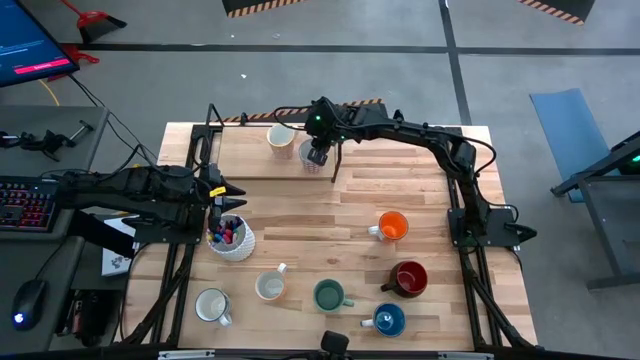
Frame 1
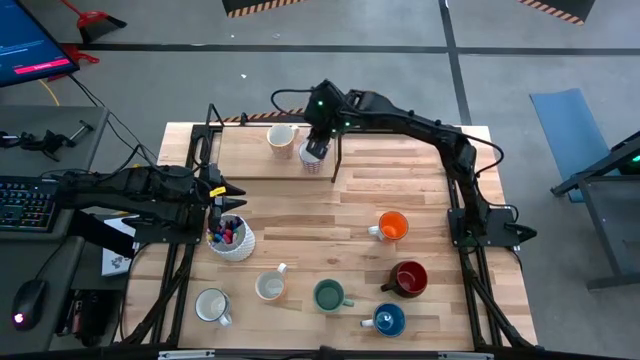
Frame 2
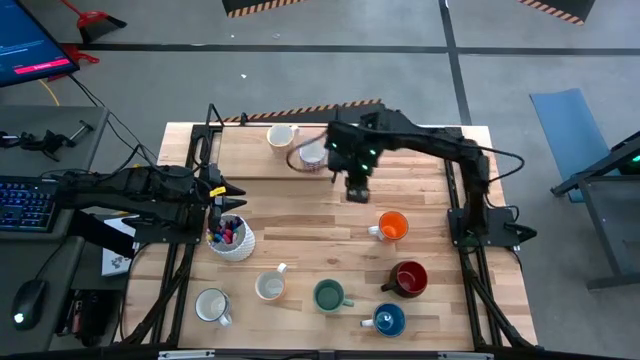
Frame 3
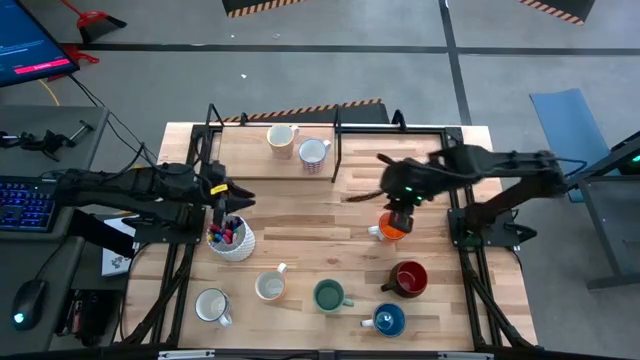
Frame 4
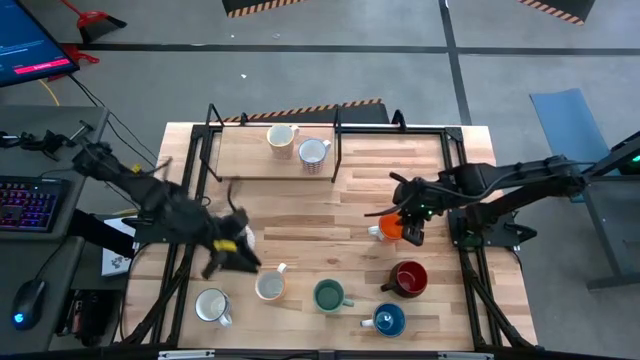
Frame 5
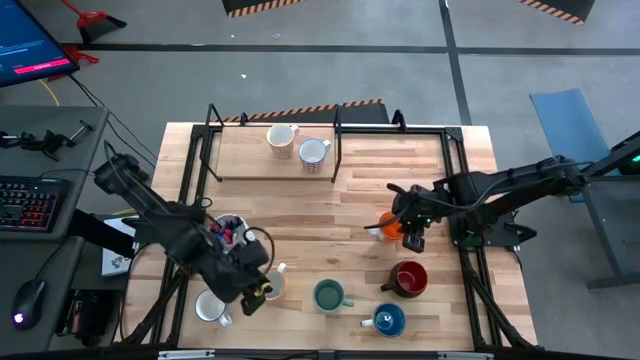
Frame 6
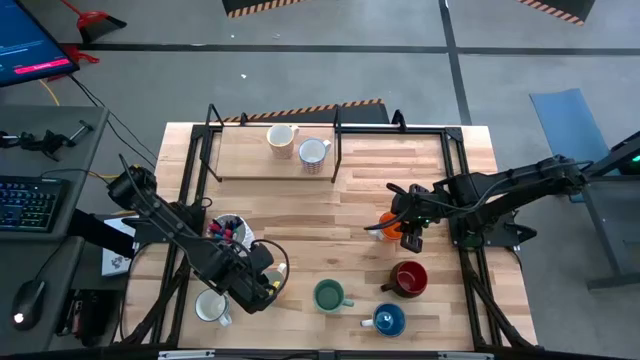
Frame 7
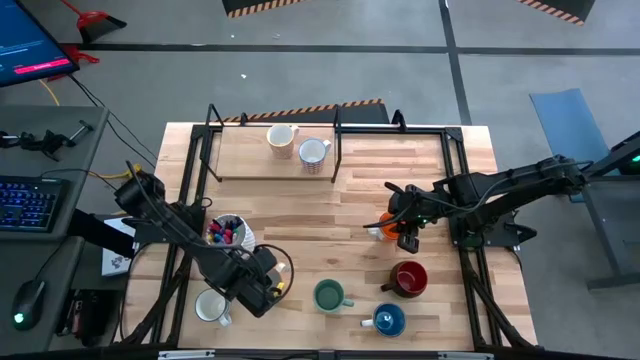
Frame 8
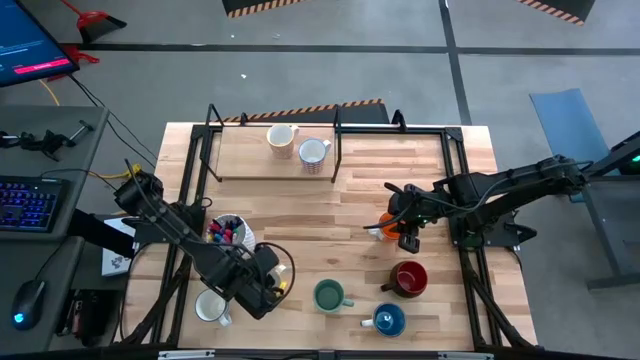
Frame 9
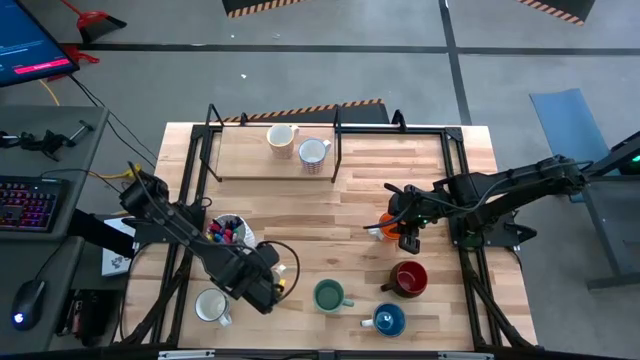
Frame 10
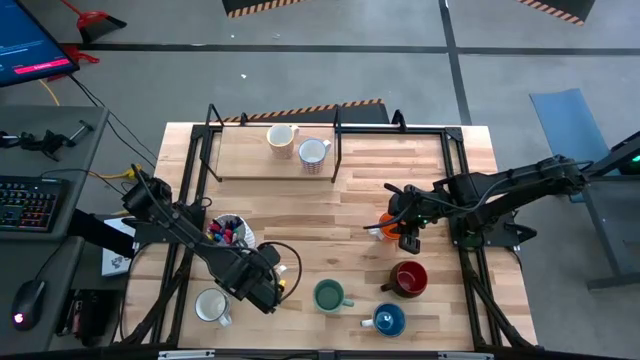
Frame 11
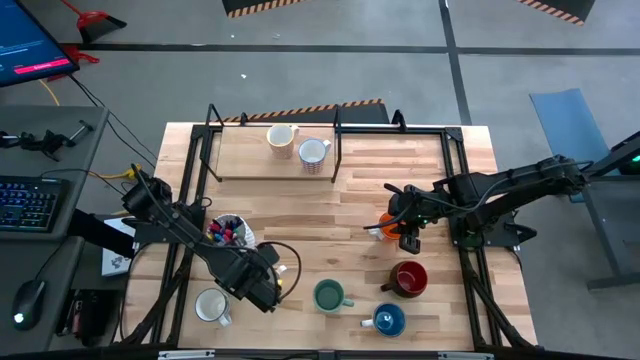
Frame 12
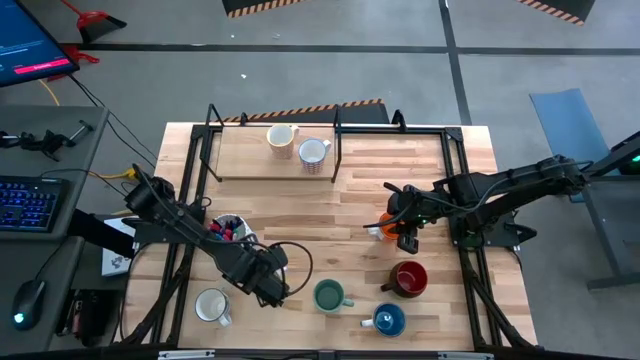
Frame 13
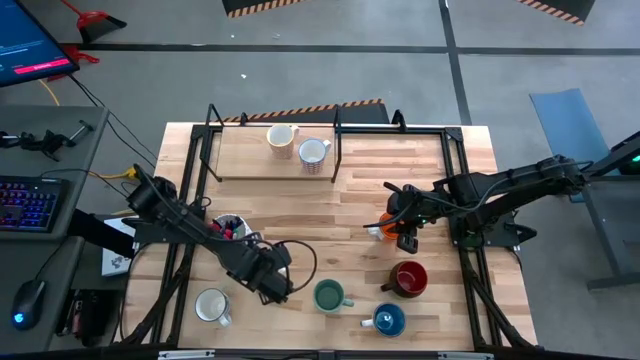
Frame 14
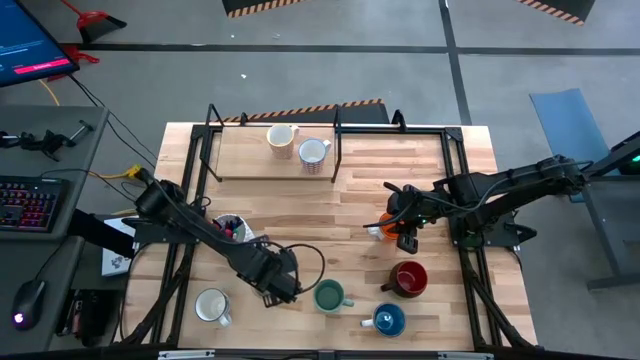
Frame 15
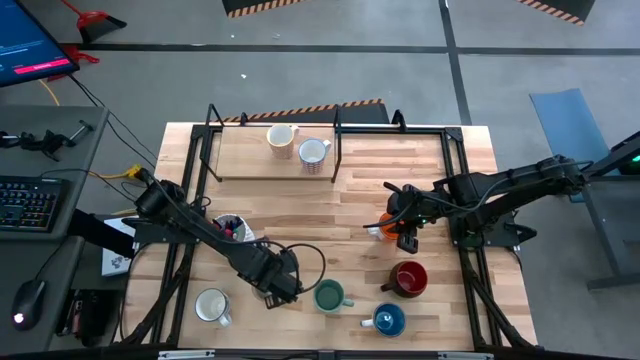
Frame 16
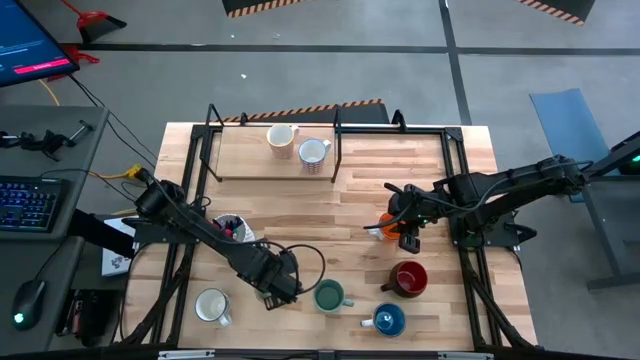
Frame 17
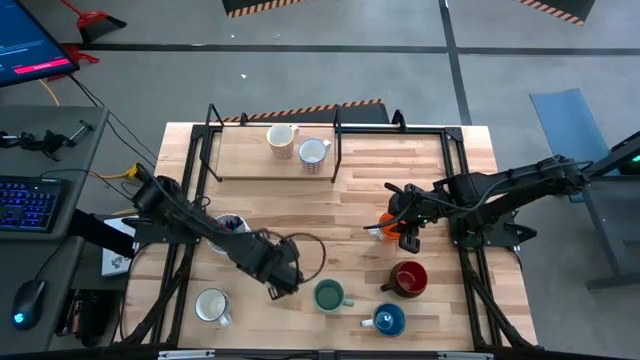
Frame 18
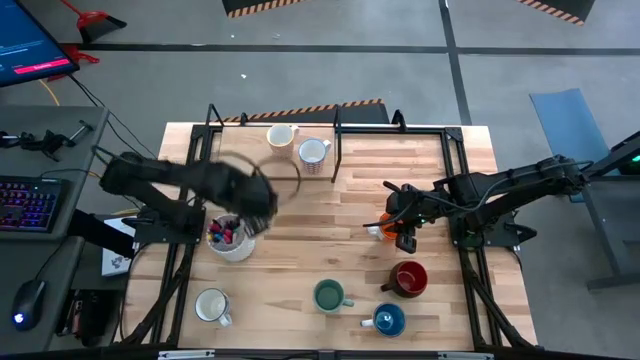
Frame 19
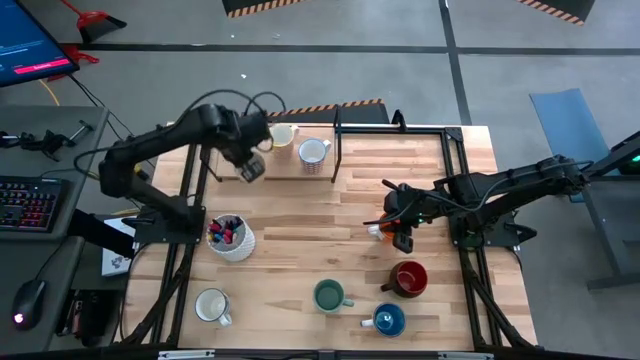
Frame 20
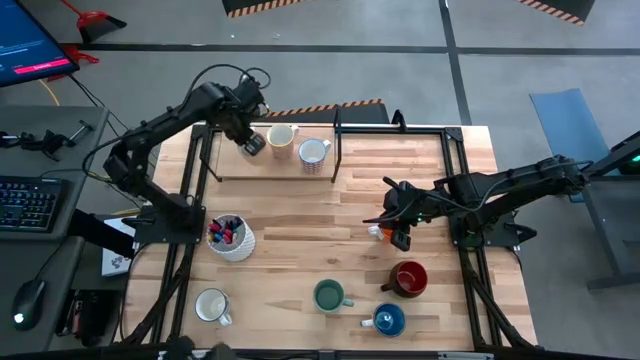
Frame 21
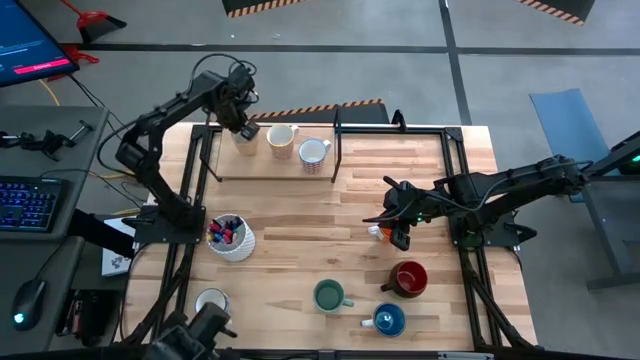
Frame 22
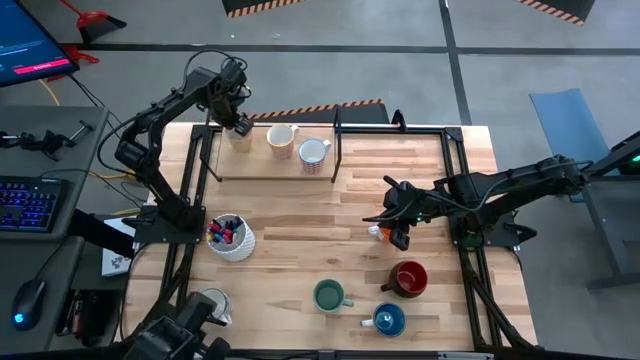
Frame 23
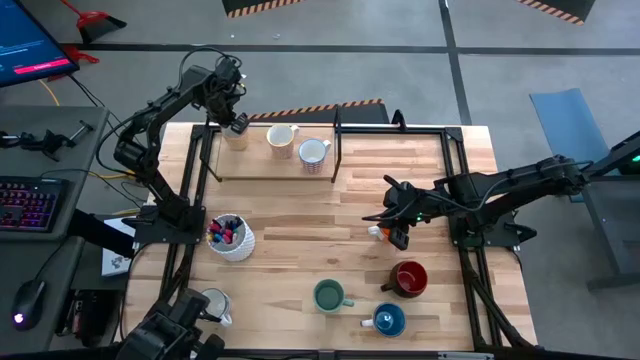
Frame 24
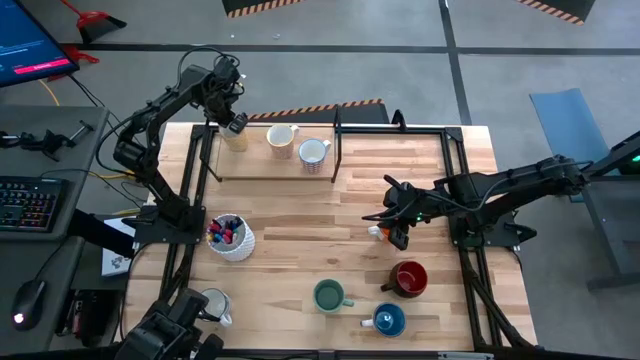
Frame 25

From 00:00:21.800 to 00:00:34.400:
Task: Place coffee mugs
Put the yellow patterned mug on the shelf

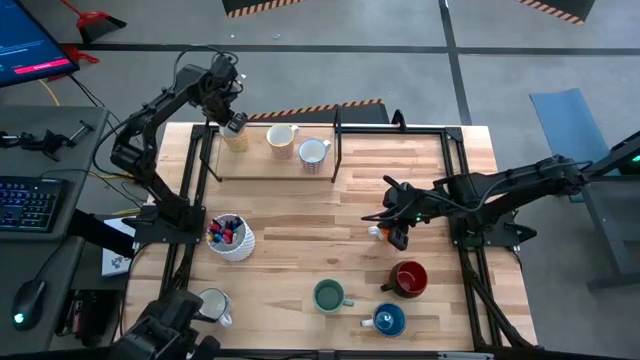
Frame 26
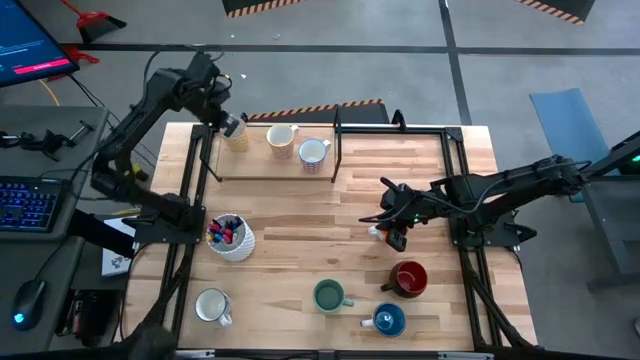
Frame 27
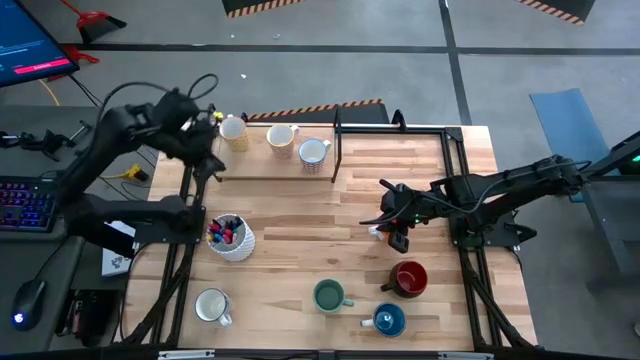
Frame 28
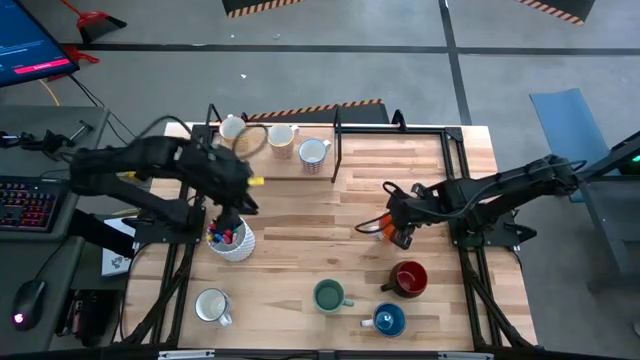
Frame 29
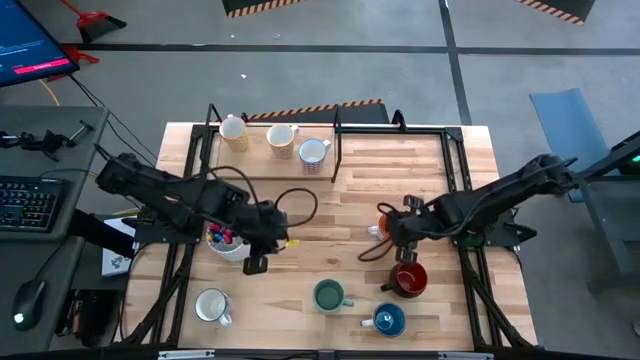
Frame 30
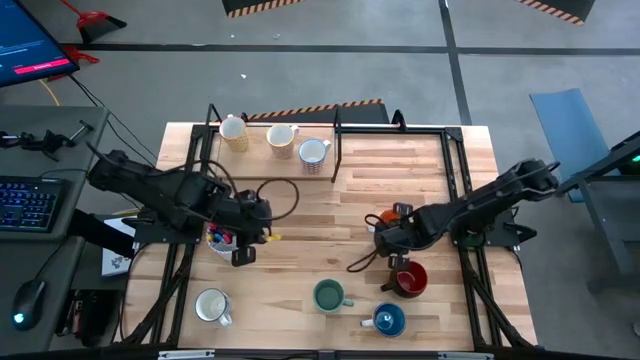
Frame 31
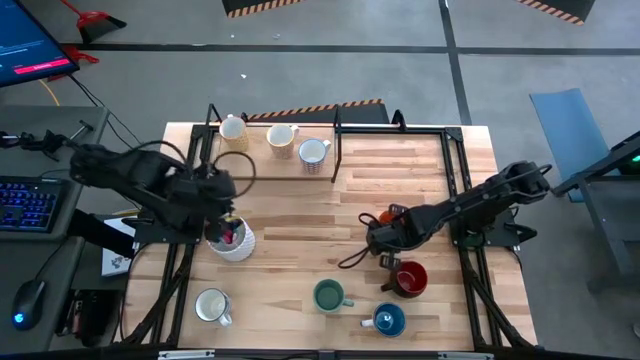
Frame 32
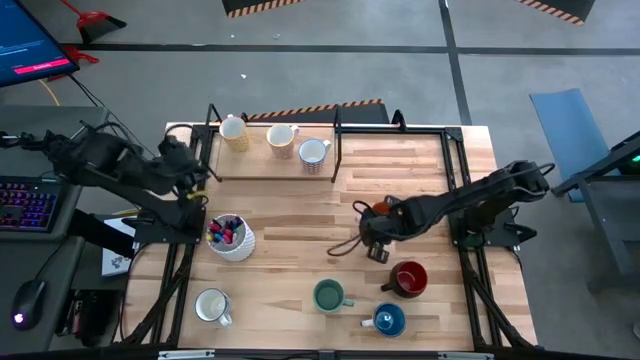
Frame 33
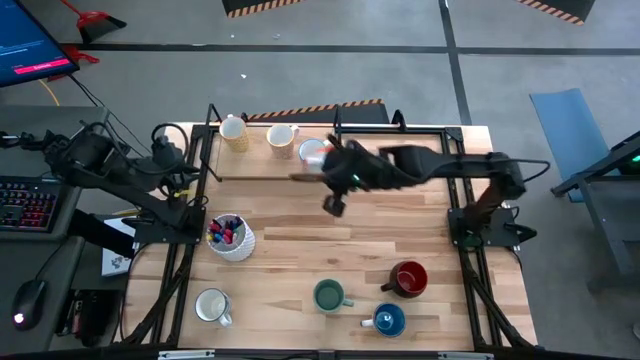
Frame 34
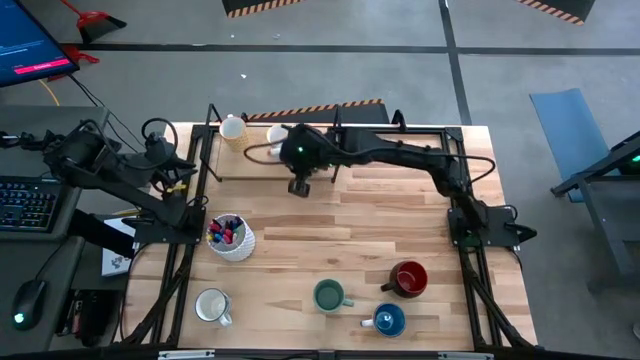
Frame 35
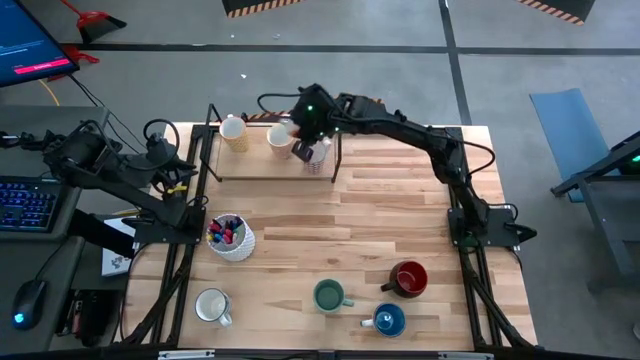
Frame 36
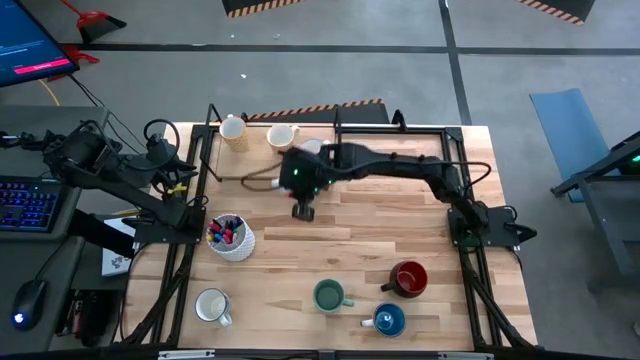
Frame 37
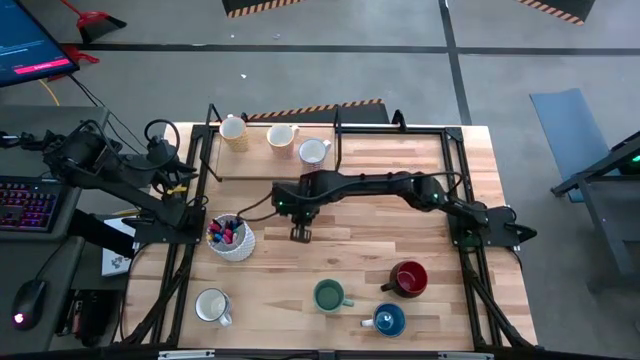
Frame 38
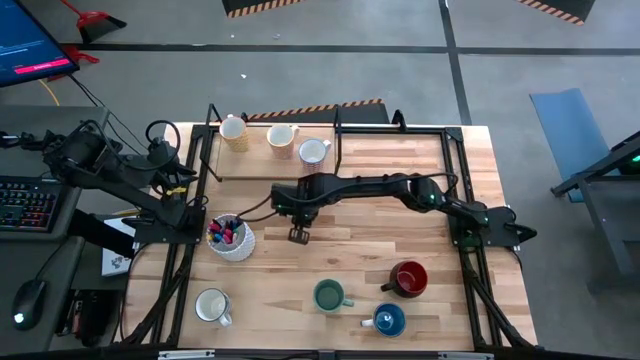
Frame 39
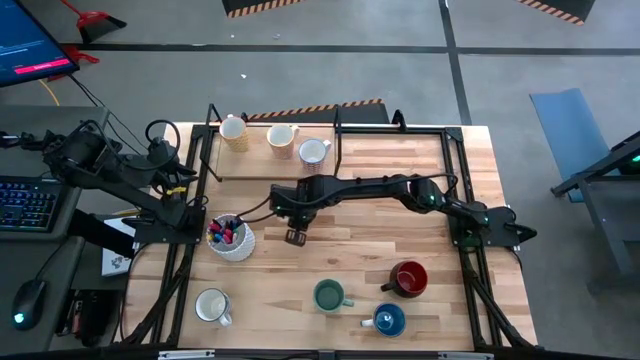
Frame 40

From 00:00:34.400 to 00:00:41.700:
Move the orange mug to the center of the table
